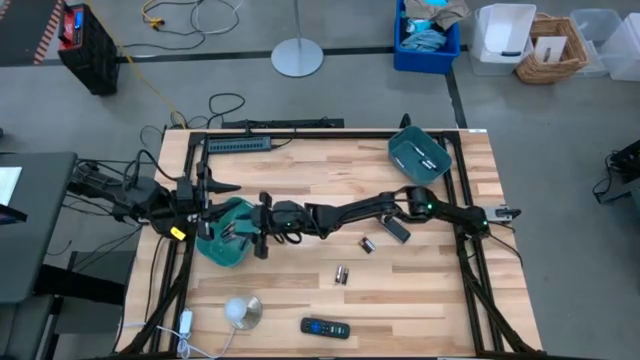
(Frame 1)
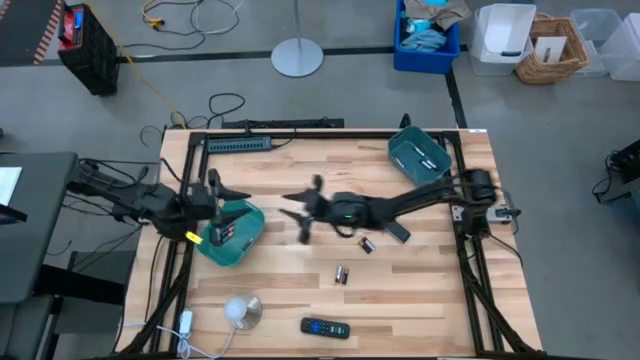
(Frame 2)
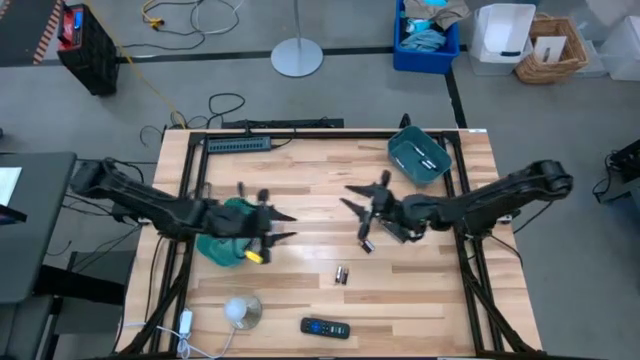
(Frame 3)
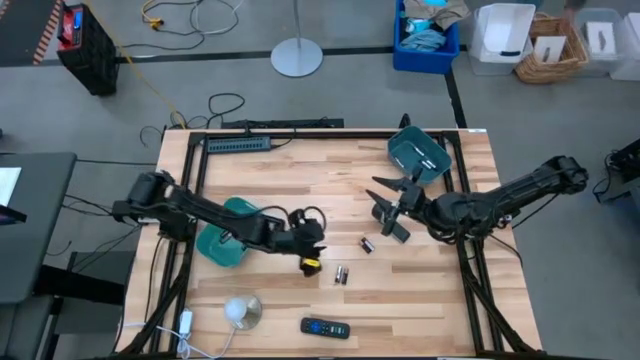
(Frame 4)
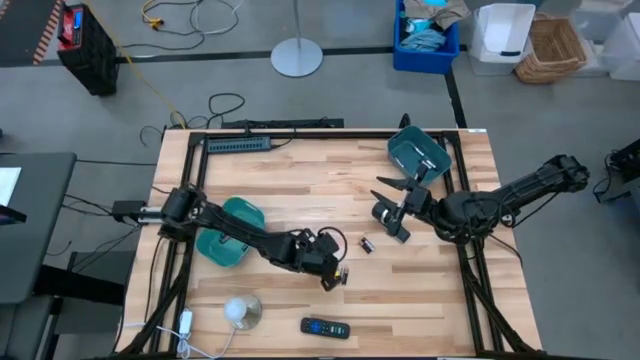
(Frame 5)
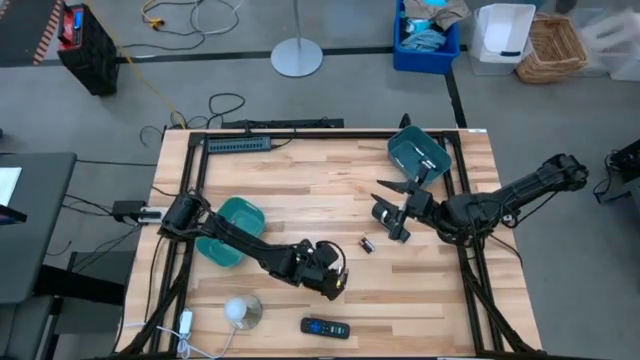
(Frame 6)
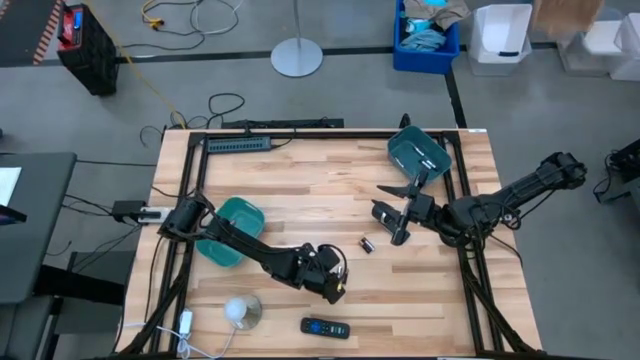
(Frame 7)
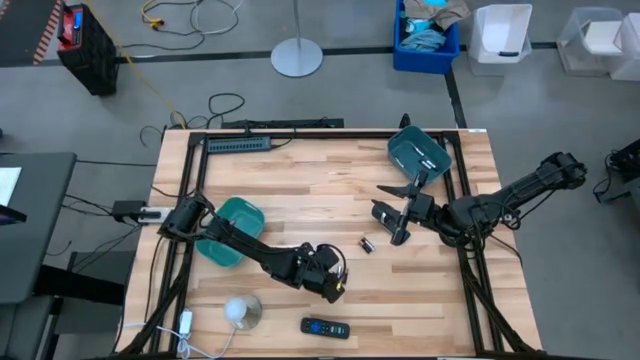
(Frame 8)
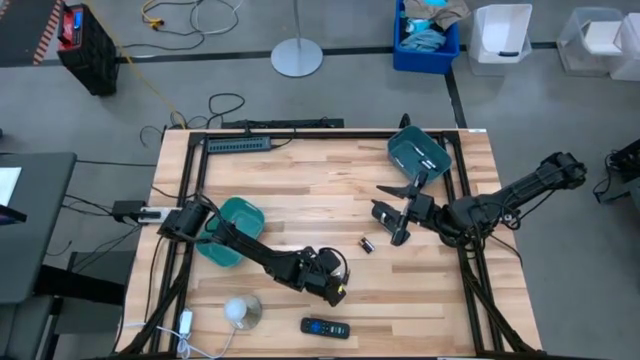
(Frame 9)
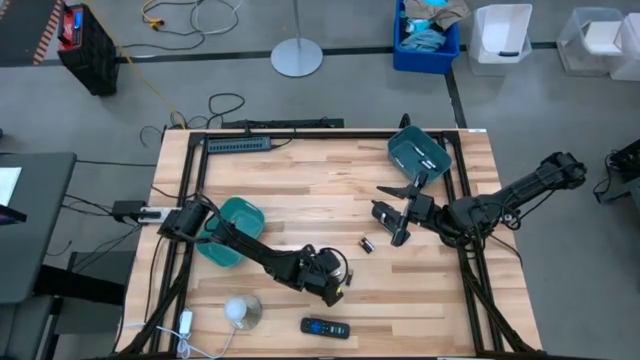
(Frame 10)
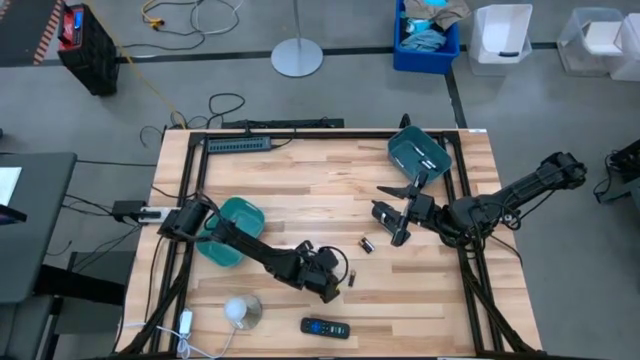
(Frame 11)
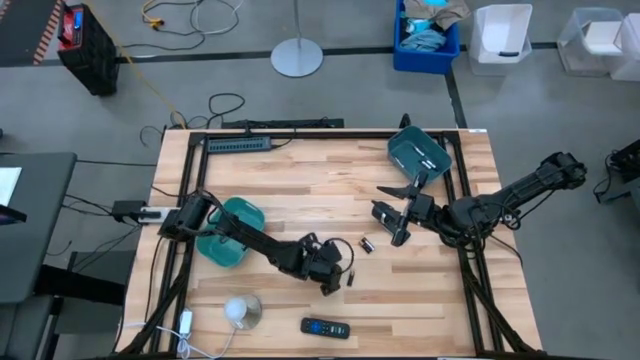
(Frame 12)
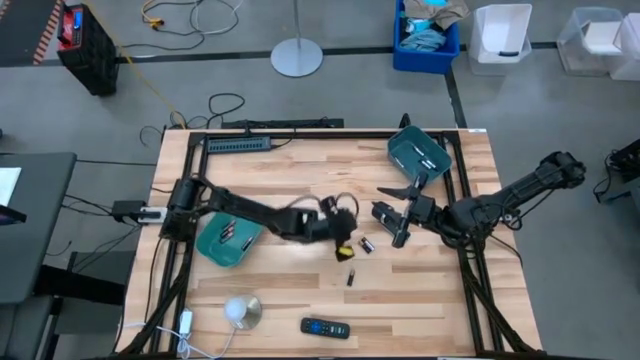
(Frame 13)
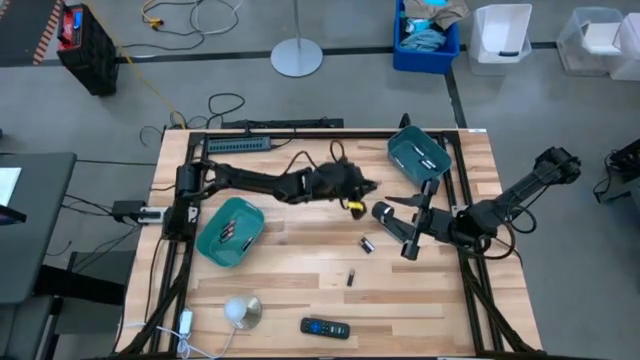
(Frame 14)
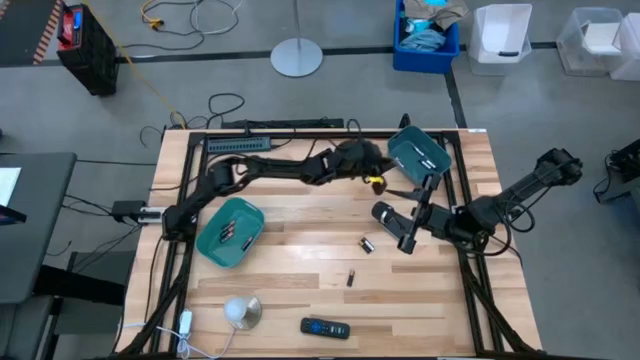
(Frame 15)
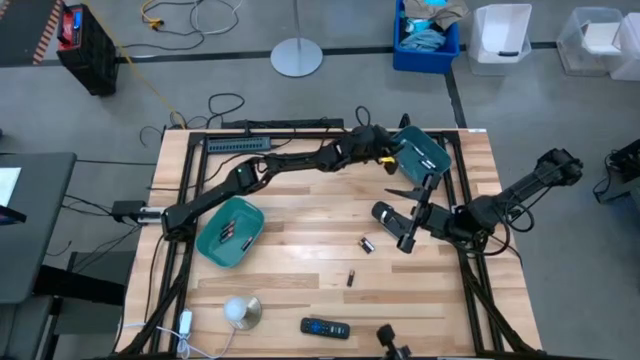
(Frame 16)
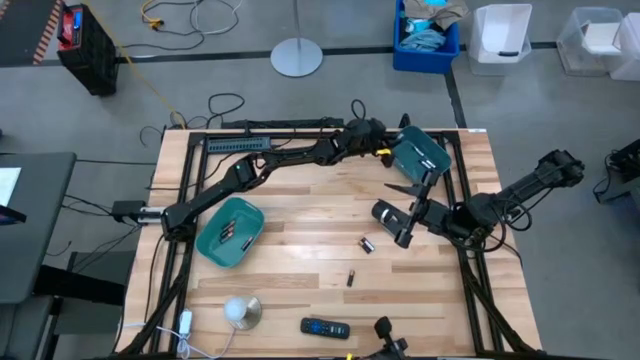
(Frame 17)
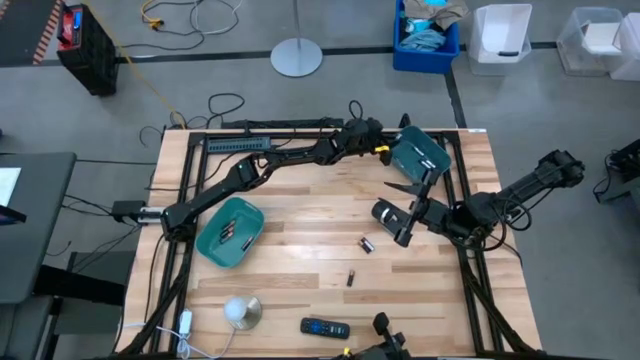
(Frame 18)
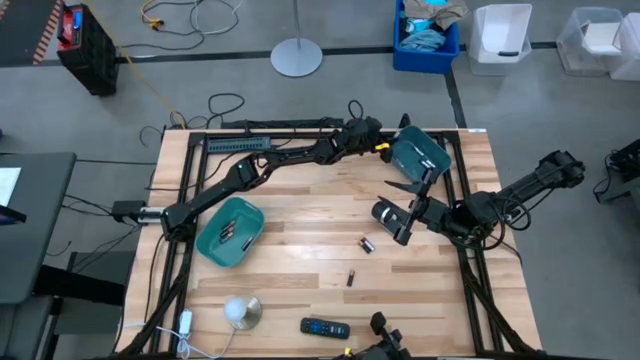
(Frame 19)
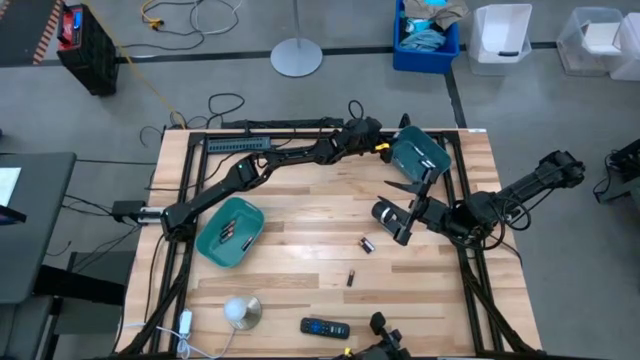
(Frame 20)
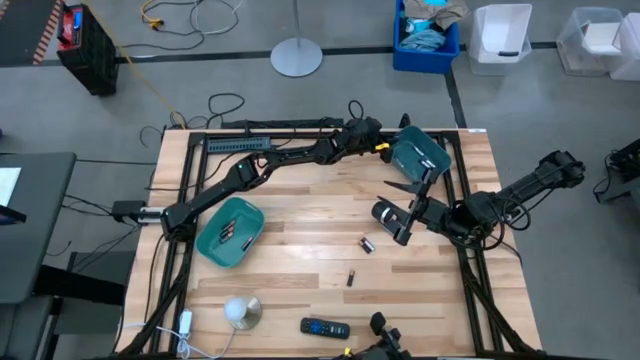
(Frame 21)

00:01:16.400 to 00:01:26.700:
Task: Sort batteries
Put the silver battery into the blue bin

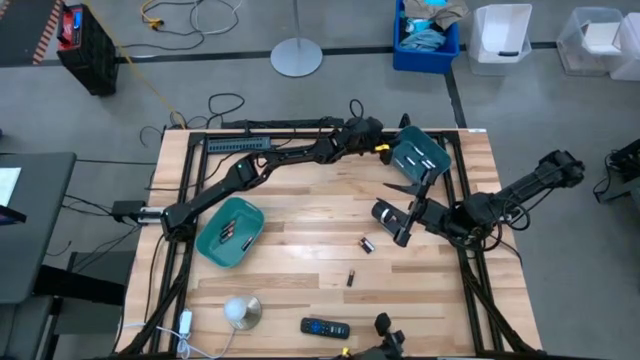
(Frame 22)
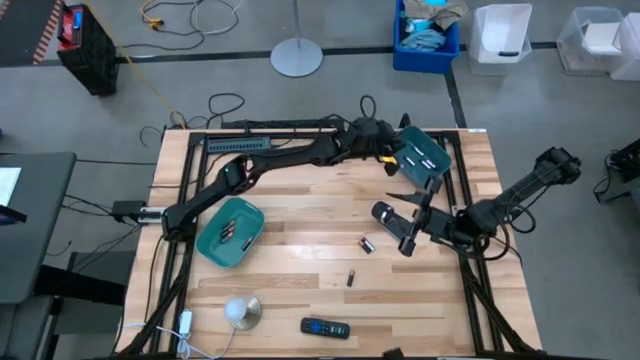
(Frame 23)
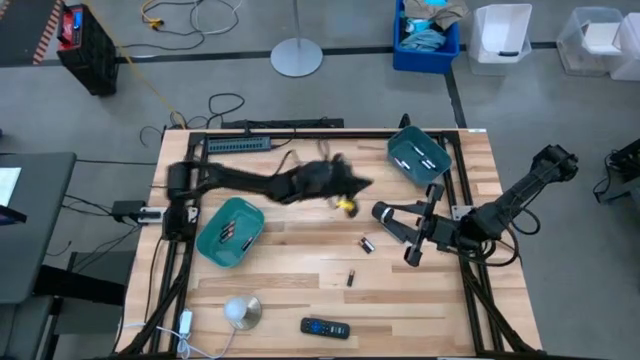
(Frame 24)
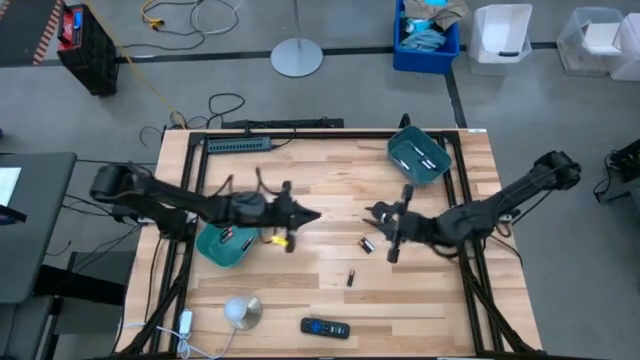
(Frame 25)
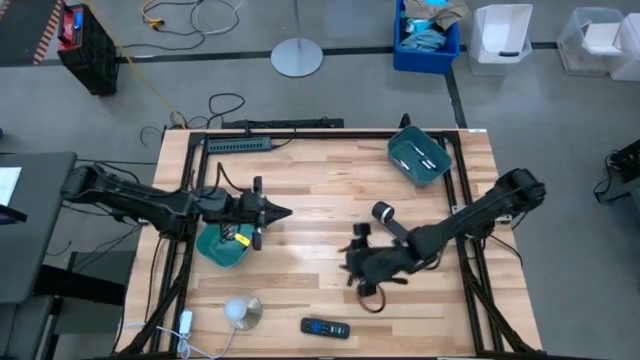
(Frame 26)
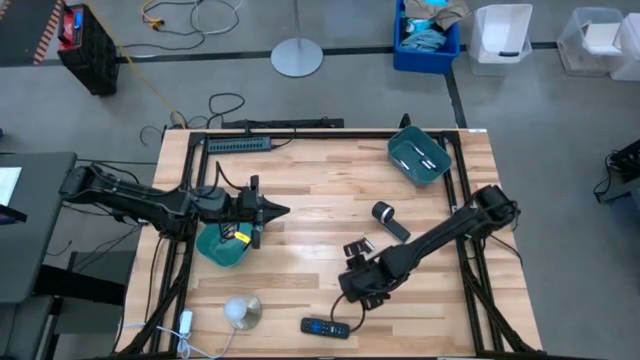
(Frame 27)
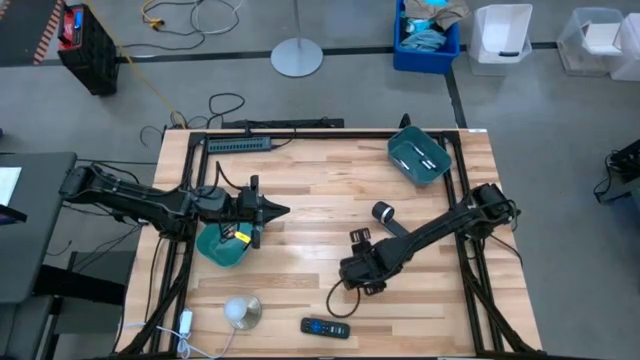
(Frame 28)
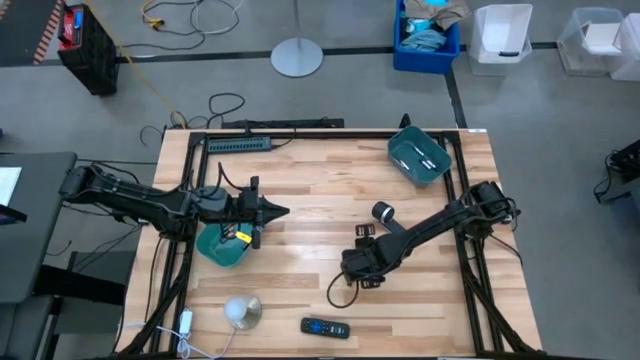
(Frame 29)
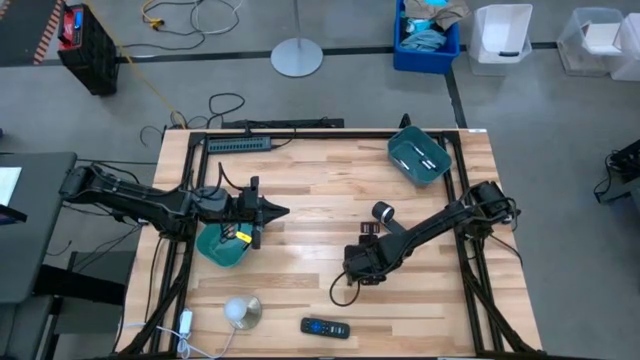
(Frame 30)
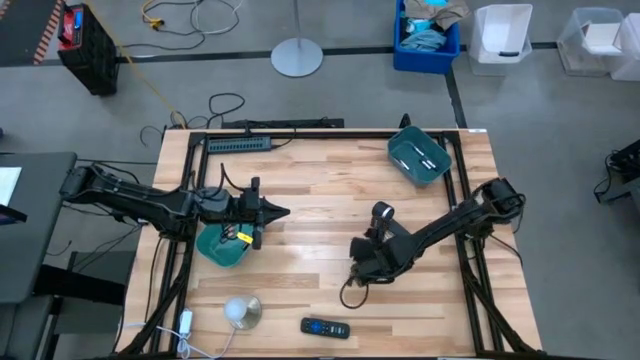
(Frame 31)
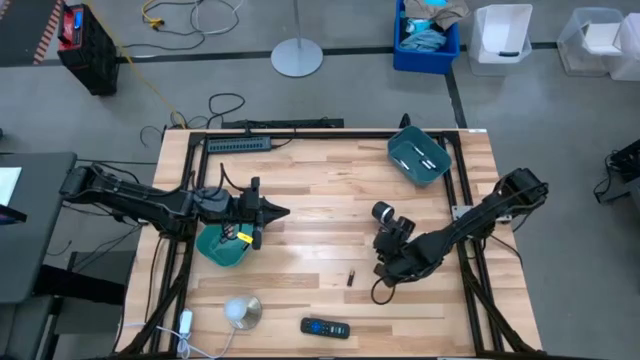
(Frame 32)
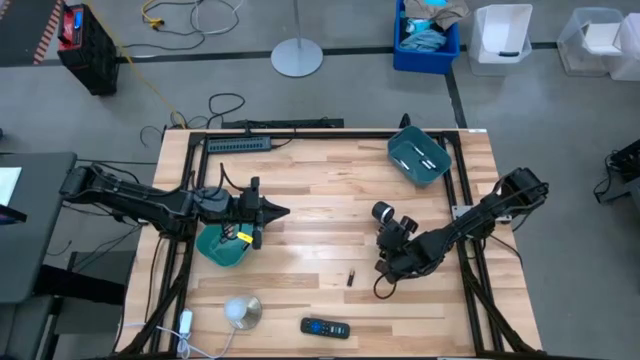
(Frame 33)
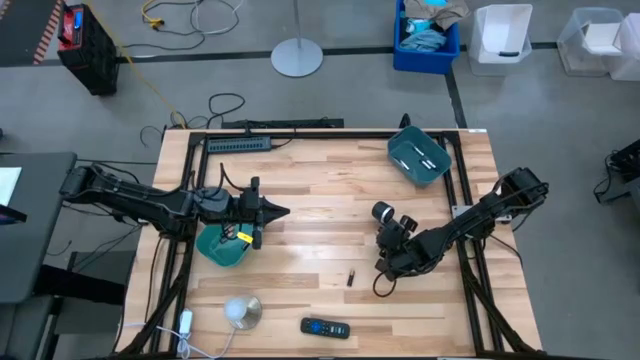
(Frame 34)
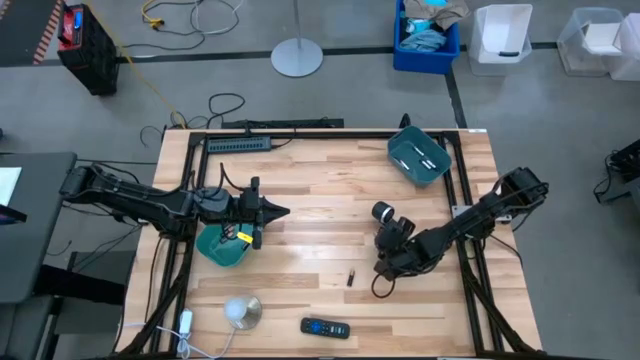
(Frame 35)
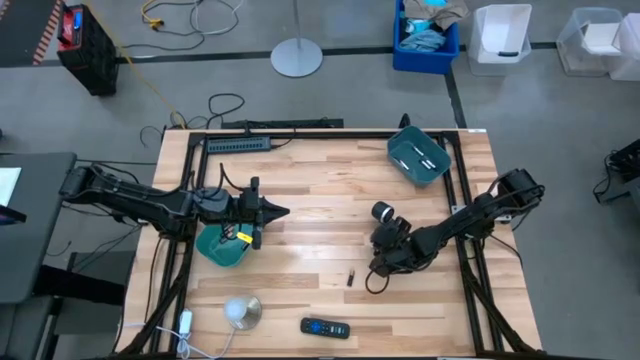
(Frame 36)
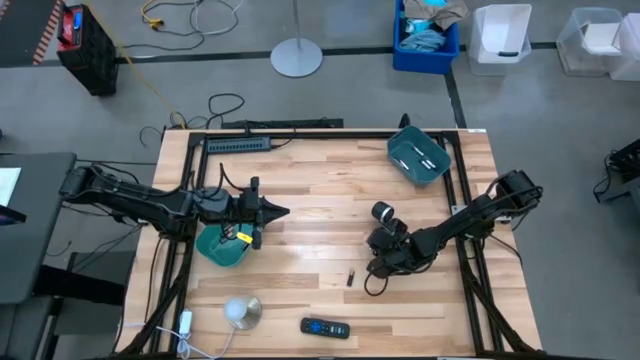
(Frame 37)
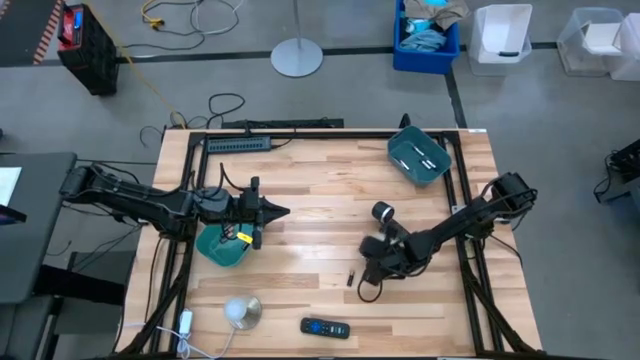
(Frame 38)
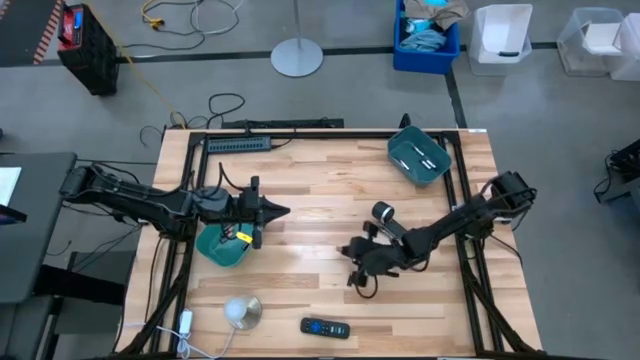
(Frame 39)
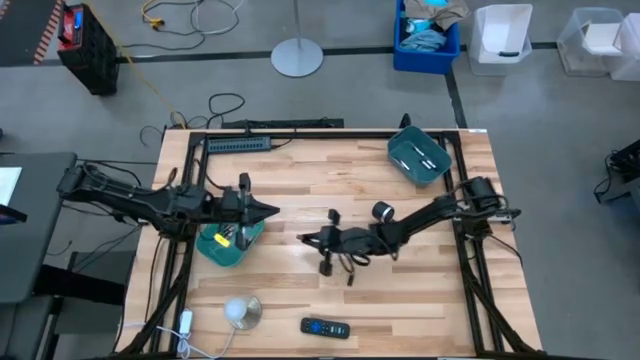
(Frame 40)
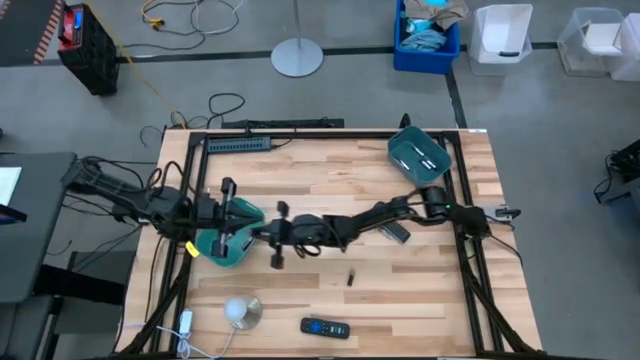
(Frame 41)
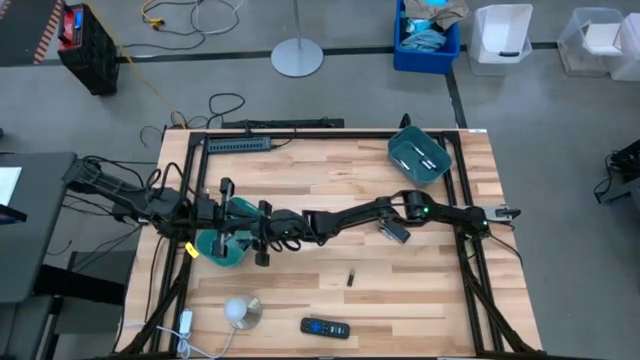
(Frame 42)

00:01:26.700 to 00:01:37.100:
Put the black battery into the green bin

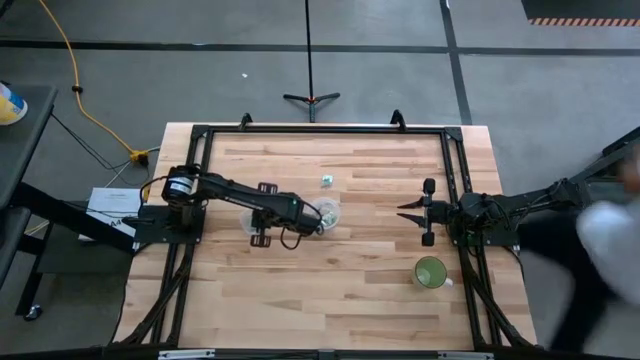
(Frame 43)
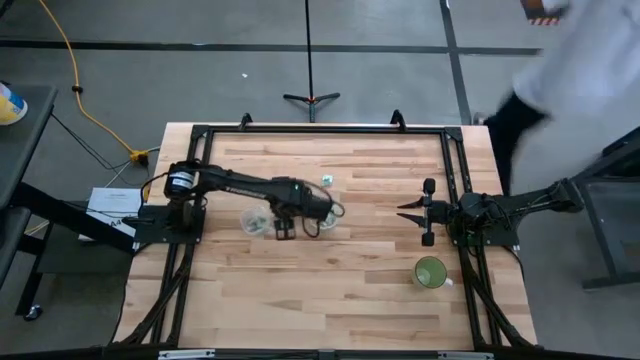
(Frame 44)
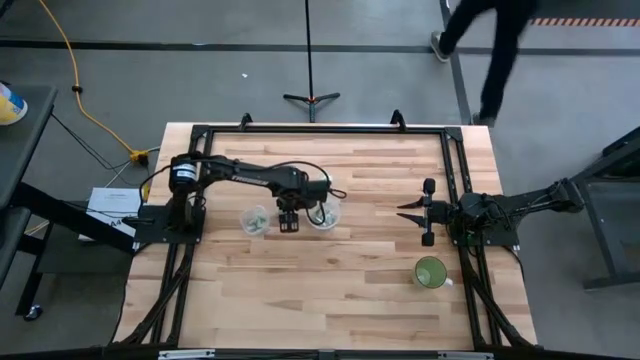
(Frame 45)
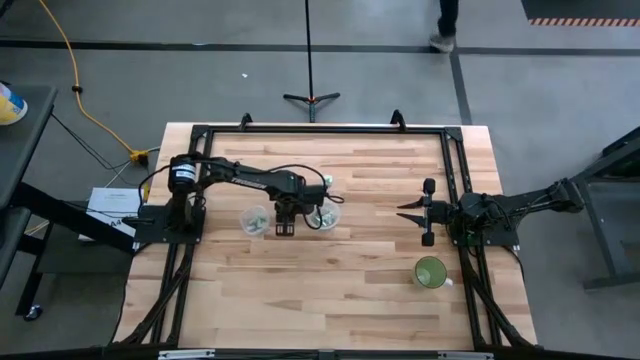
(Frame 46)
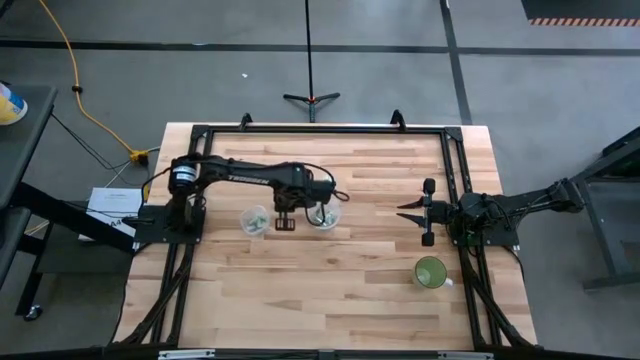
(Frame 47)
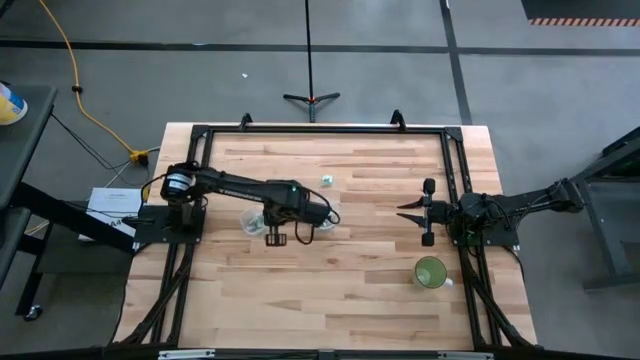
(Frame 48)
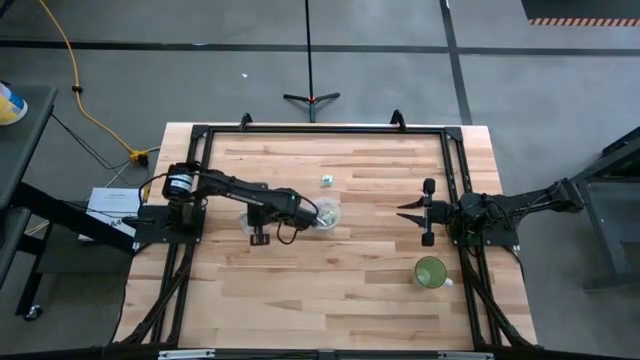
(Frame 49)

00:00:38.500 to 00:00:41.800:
Task: Pick and place Stevia / Truvia into bins
Put the white stevia packet into the left transparent container
